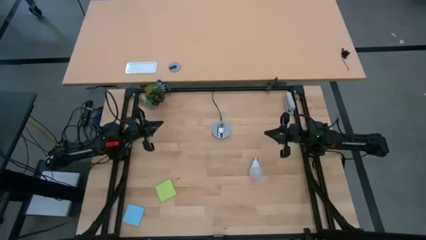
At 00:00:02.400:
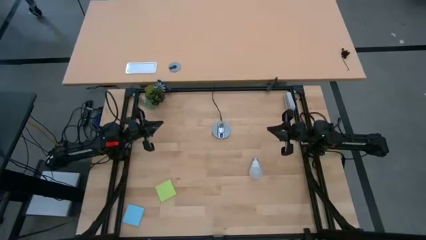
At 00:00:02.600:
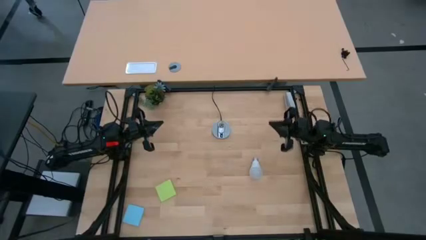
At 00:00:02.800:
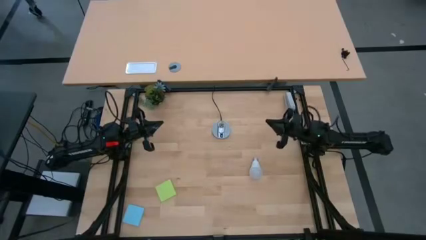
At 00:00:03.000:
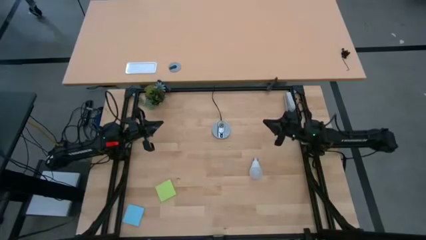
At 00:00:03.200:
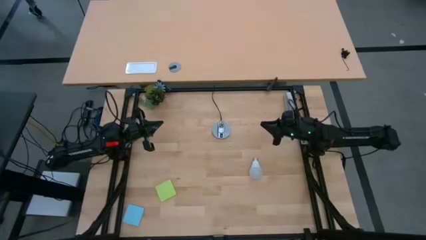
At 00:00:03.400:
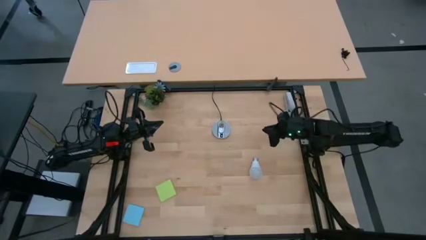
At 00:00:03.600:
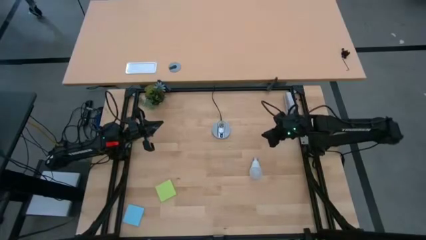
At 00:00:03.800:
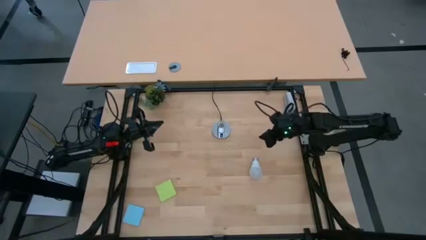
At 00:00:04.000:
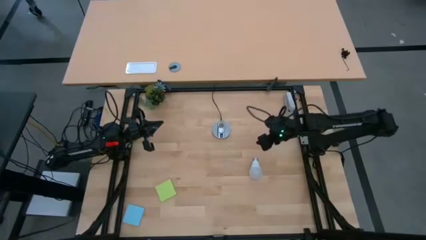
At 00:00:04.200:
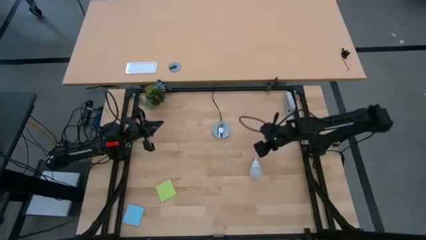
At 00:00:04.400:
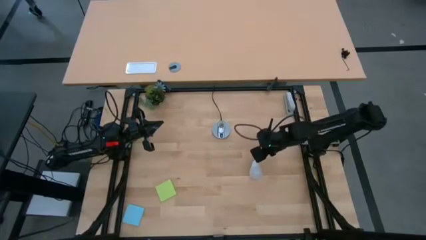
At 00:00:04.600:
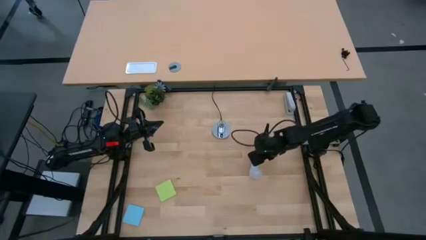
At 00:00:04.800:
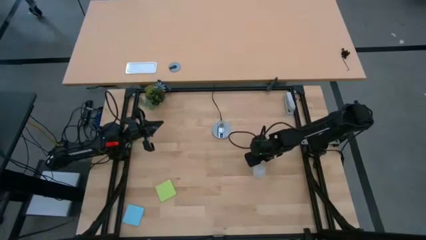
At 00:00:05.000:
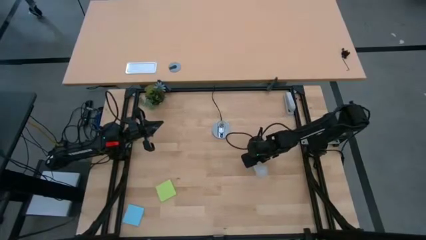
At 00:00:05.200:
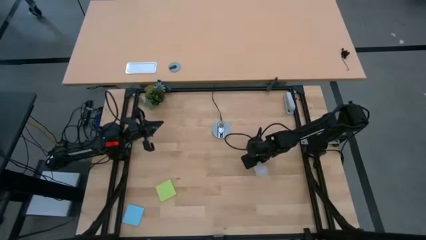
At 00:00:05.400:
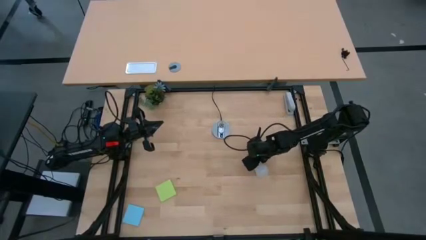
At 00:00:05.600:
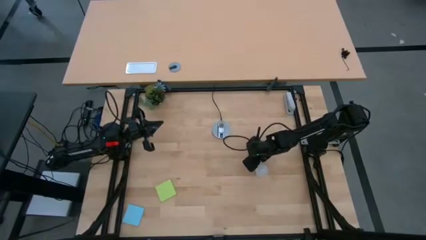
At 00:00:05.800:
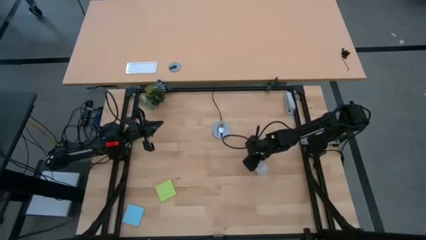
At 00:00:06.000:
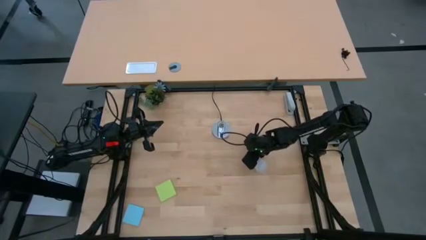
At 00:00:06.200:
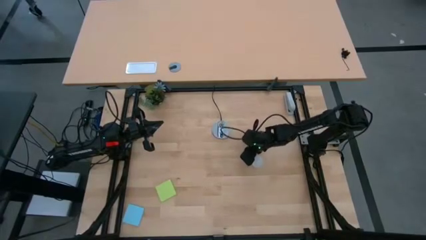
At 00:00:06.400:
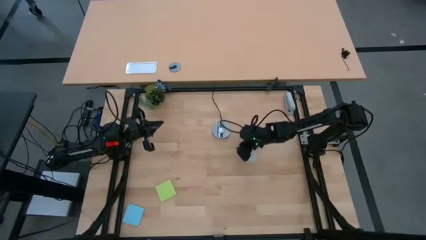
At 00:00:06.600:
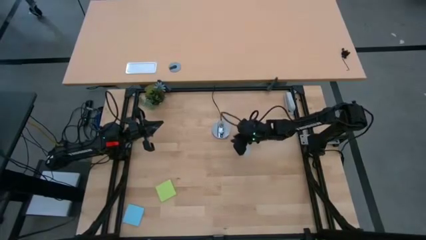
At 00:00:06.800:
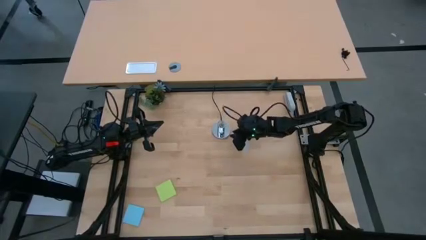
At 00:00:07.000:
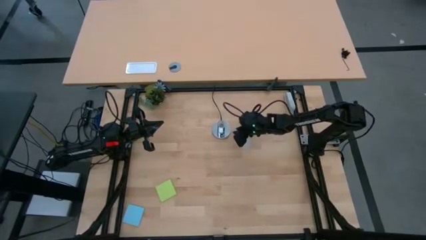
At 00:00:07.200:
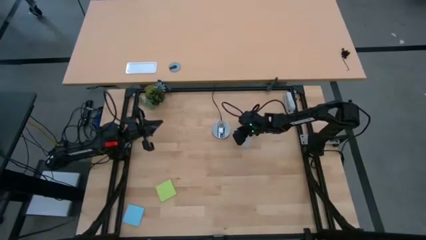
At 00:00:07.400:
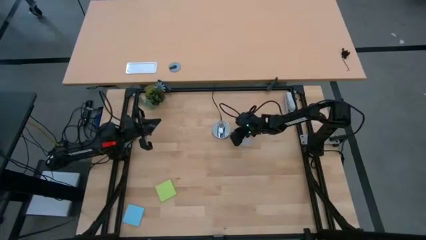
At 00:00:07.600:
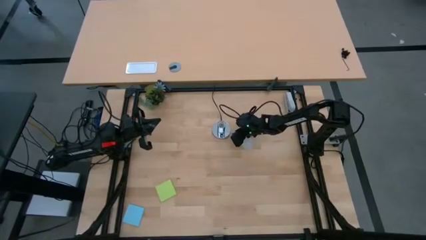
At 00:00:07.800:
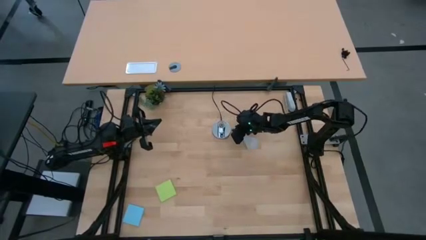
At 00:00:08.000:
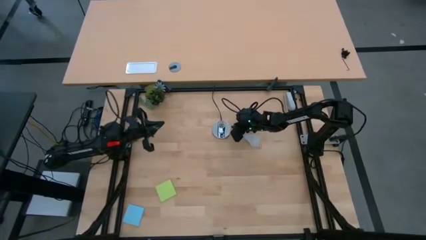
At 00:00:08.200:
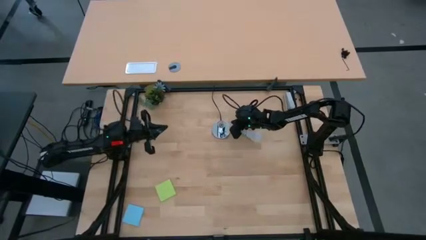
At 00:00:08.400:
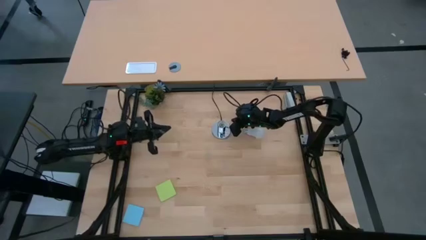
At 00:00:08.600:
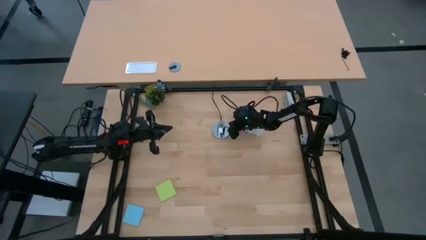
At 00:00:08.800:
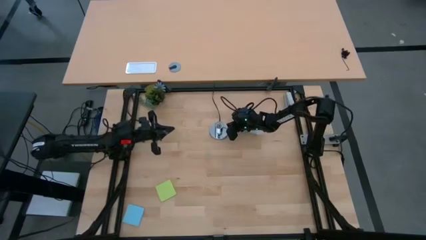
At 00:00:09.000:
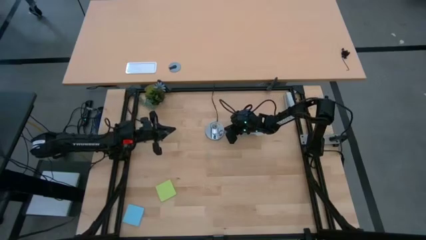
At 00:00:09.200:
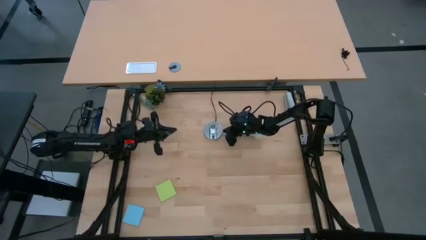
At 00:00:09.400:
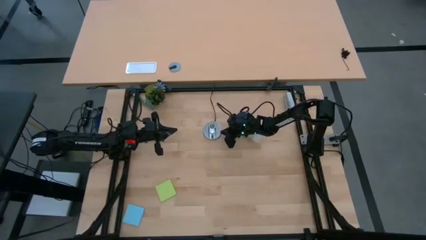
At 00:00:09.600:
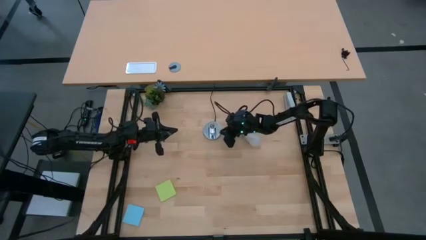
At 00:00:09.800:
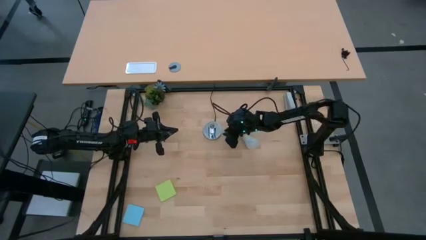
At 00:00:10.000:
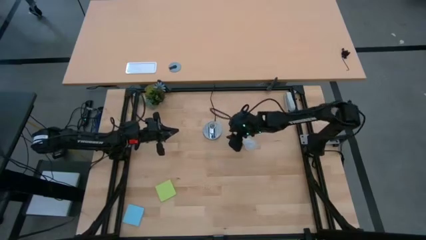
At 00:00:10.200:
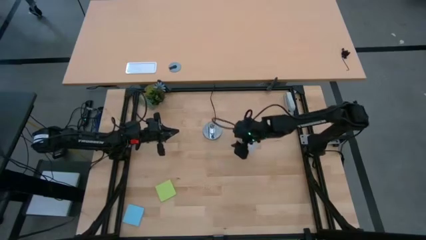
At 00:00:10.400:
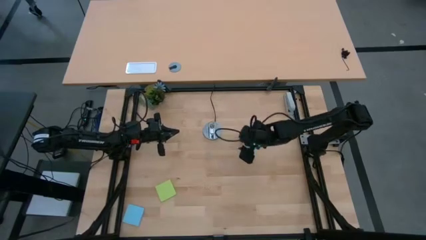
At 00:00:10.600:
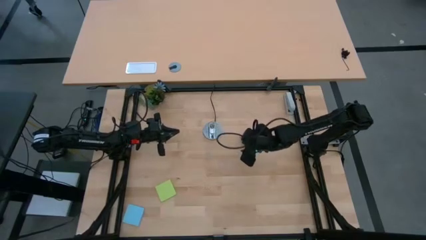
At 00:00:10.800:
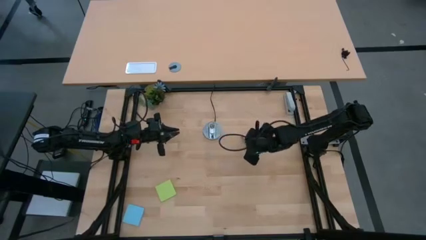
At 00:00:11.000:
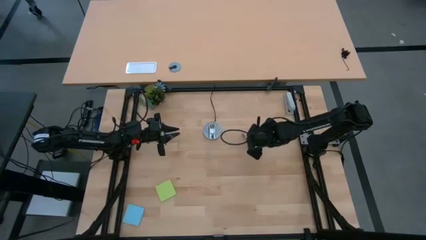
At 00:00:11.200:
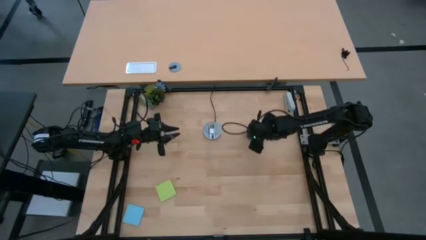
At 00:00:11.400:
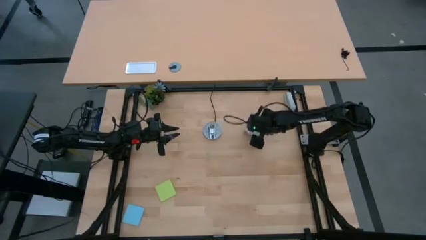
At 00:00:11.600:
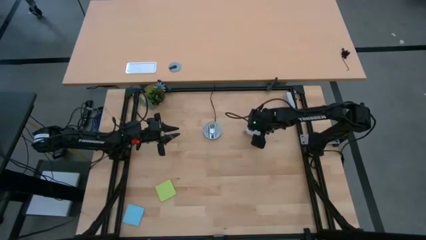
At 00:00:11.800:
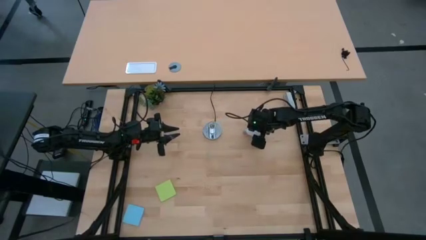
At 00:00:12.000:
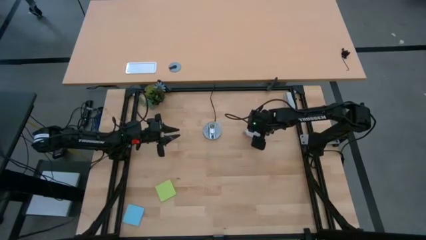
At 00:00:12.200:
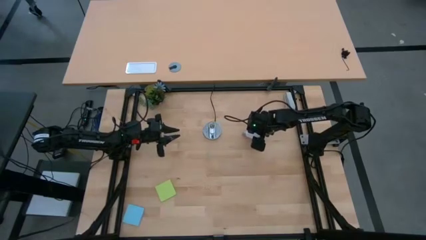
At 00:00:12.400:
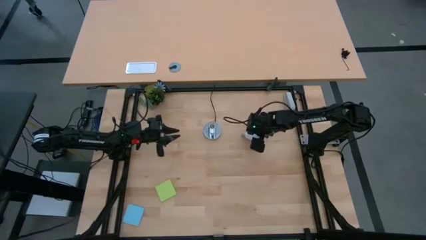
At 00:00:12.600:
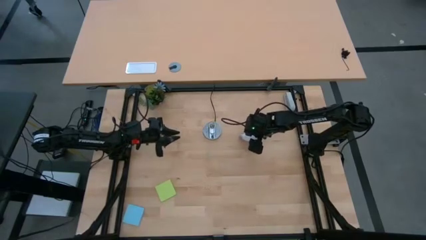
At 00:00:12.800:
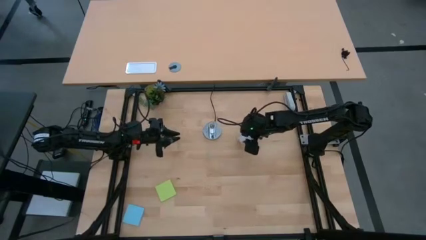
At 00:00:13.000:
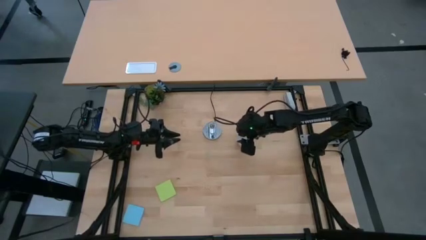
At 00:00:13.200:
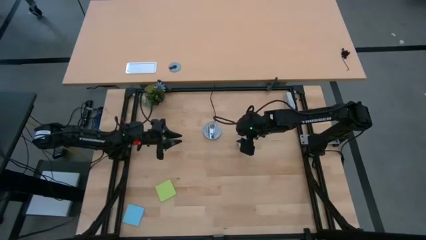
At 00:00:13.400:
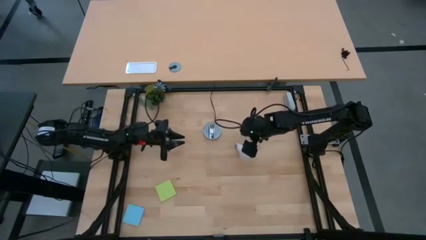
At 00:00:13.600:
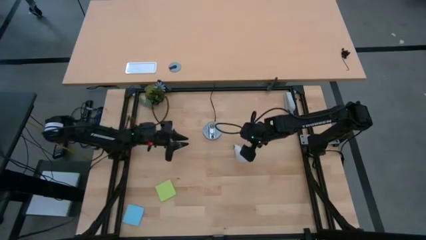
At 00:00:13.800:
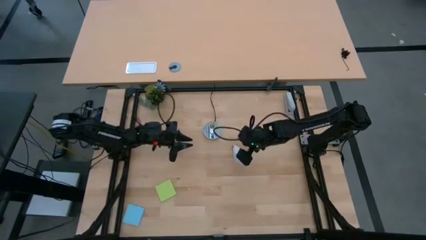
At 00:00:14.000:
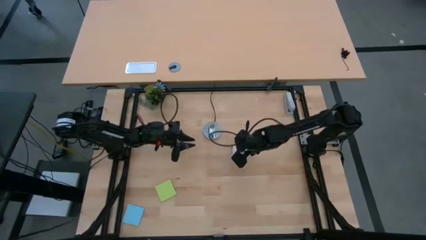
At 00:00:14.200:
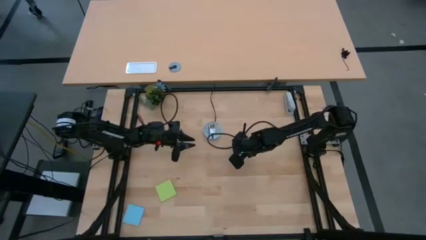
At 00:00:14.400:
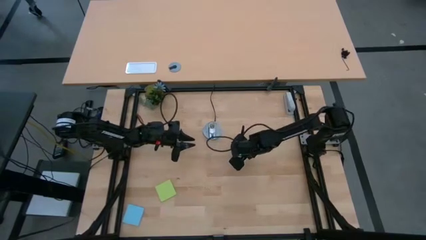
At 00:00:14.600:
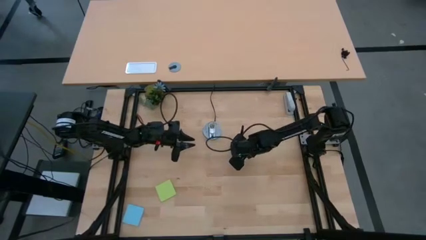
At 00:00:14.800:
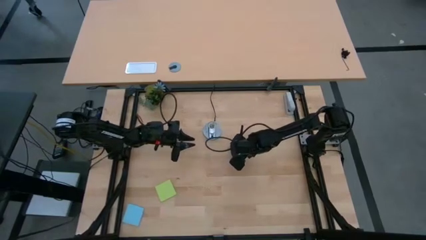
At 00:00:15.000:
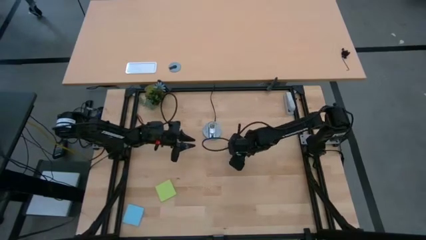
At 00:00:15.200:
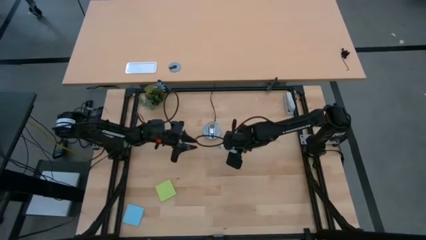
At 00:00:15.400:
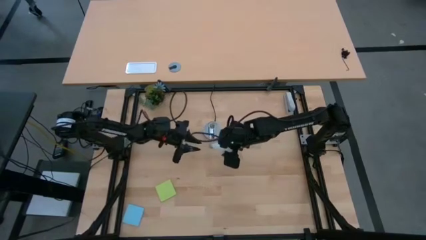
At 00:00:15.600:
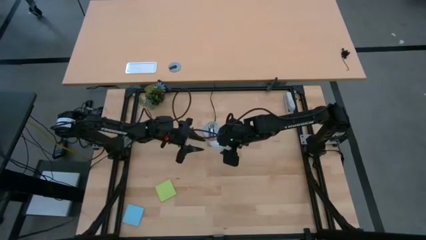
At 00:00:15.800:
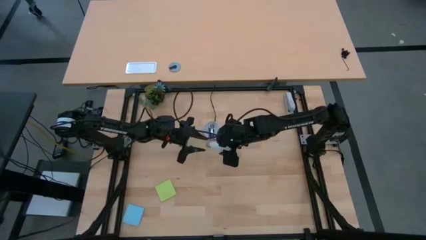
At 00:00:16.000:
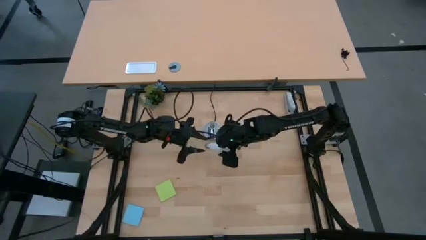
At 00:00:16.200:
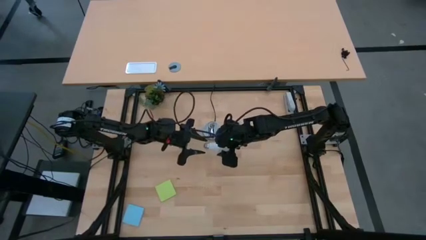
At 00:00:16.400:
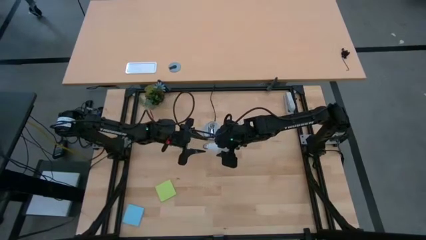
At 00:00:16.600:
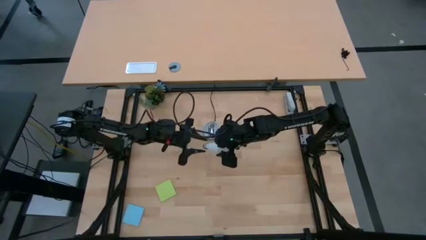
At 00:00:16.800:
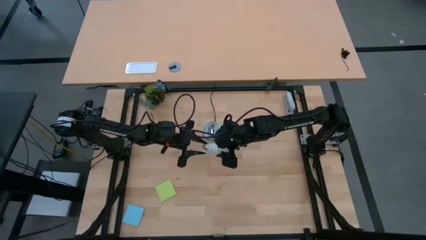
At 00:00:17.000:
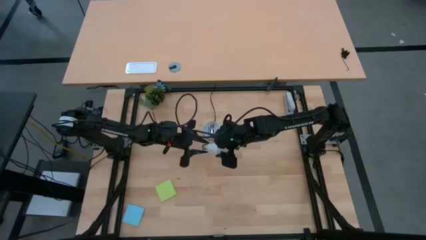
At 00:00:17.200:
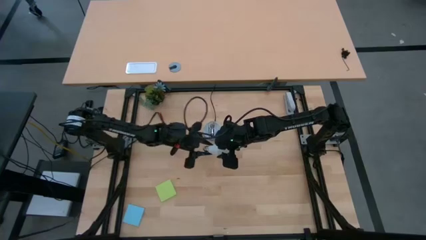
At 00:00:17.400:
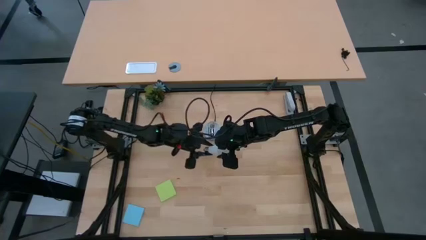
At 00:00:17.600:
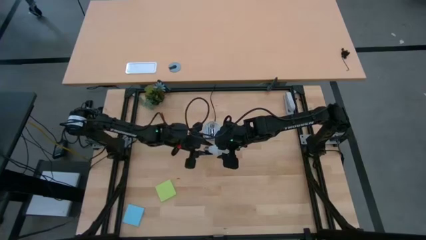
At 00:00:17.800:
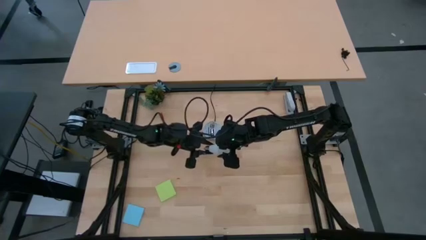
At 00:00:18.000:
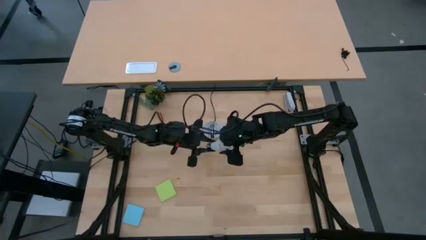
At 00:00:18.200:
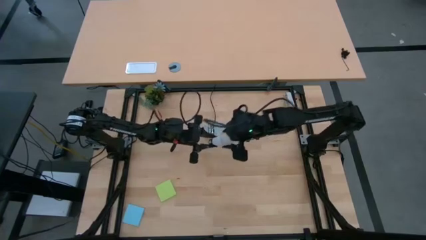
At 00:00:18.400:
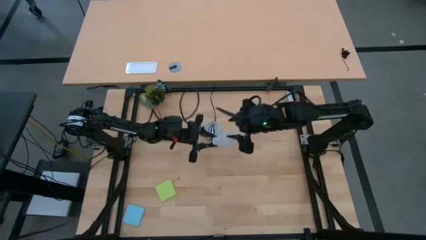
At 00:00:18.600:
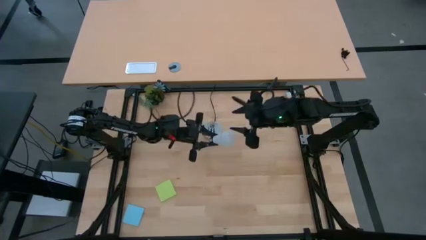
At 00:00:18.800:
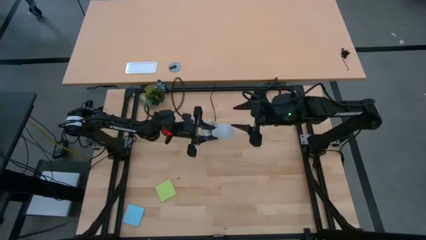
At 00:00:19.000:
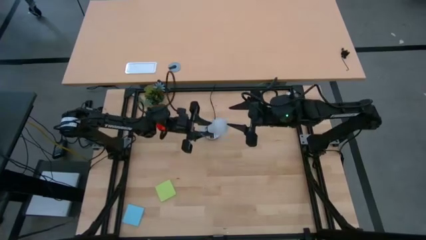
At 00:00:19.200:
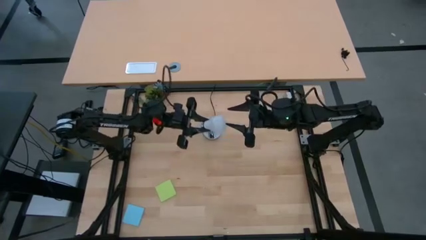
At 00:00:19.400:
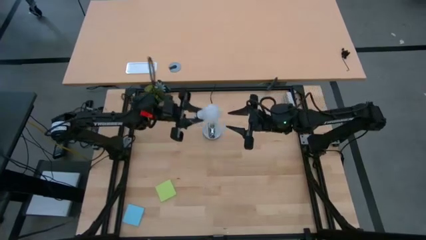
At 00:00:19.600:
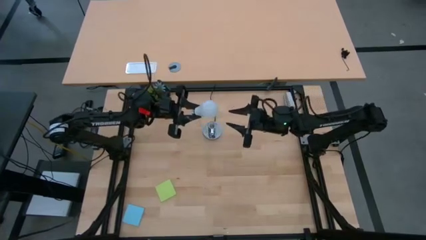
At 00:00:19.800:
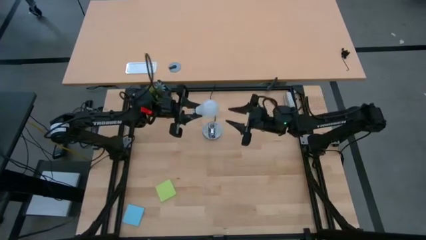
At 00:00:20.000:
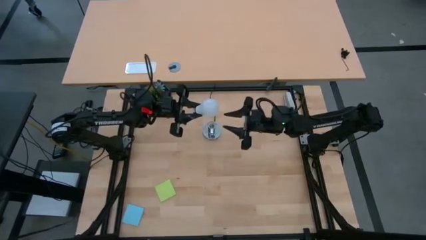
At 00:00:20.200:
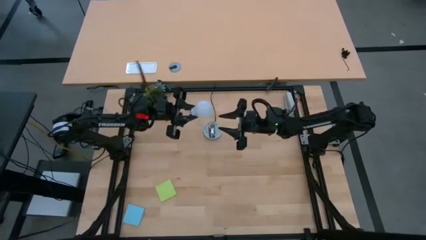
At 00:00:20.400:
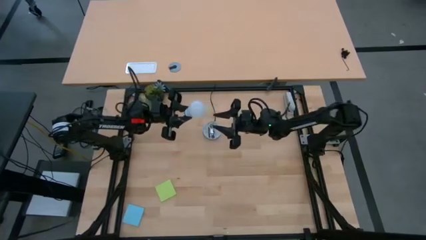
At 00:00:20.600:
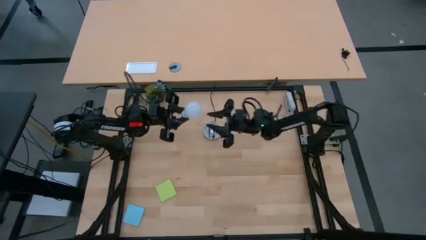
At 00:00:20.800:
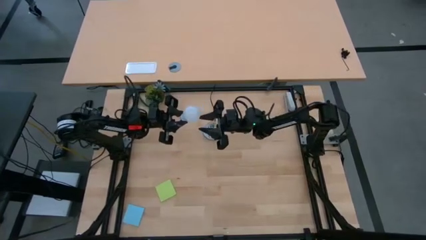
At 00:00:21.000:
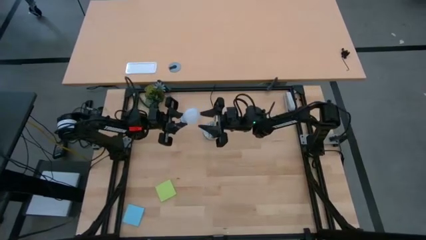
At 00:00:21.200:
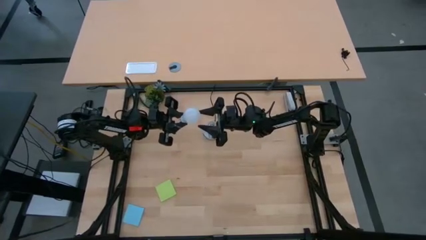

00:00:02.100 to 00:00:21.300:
Task: Screw lightbulb
Insert the lightbulb into the lamp
